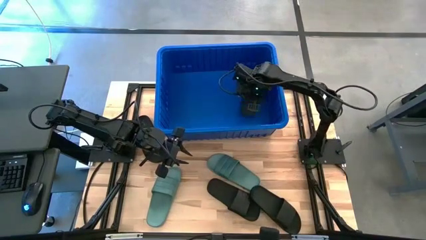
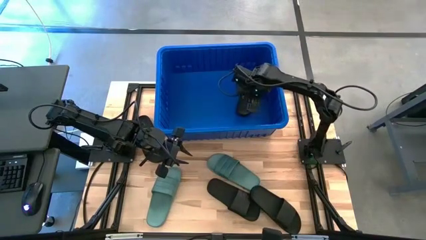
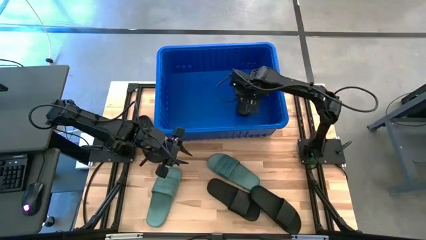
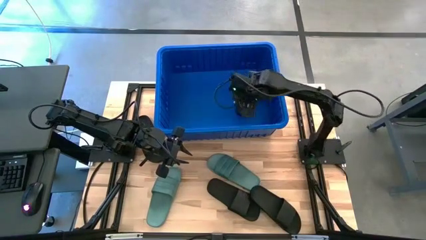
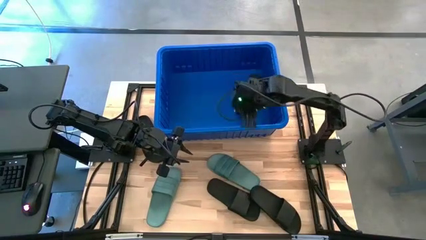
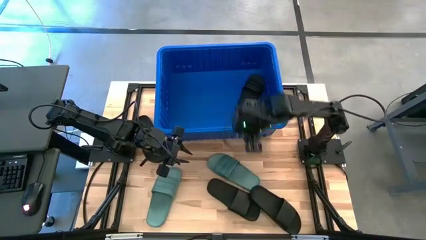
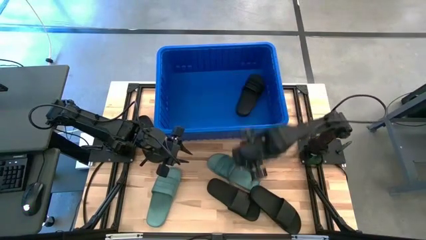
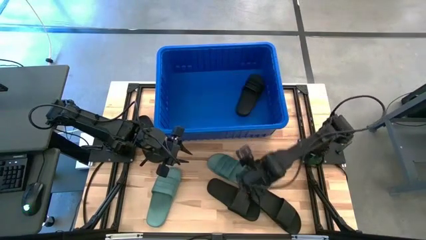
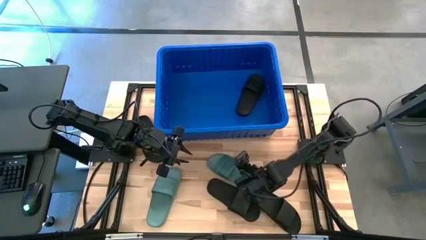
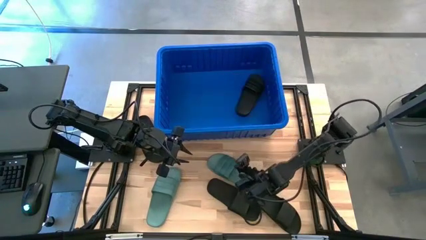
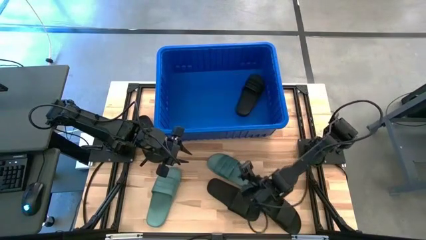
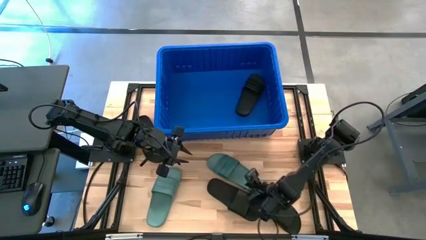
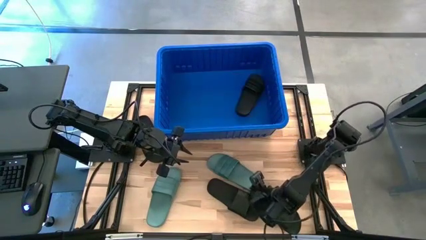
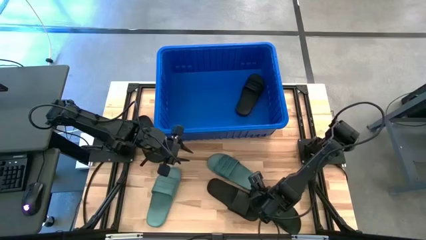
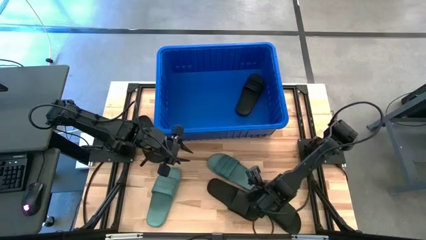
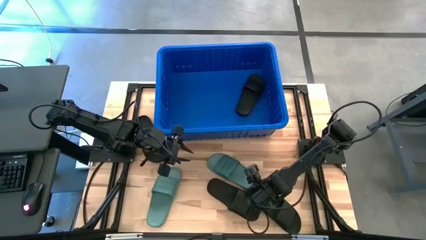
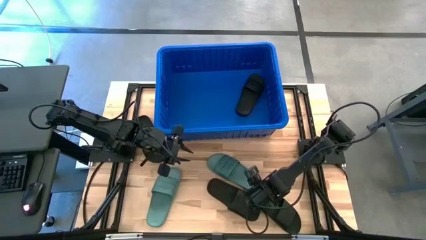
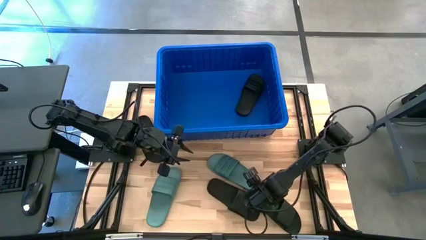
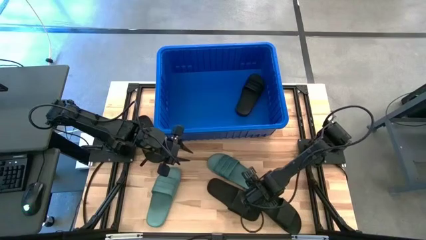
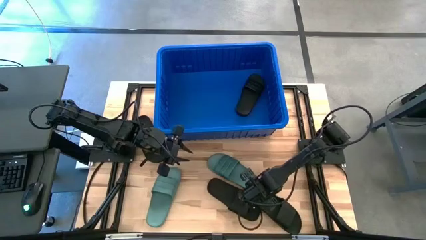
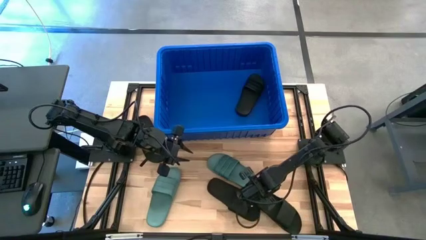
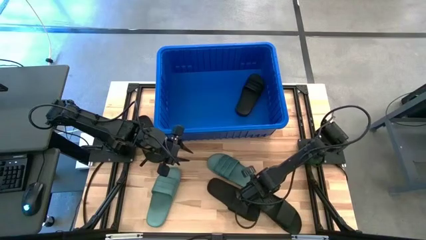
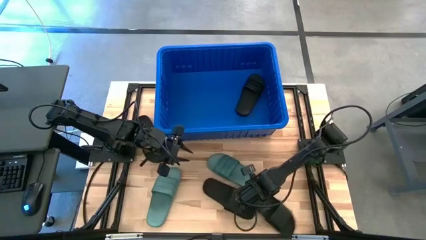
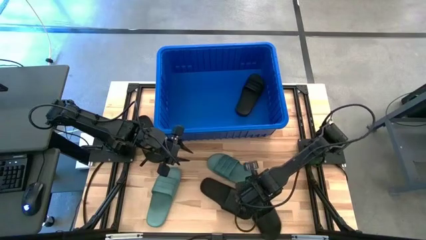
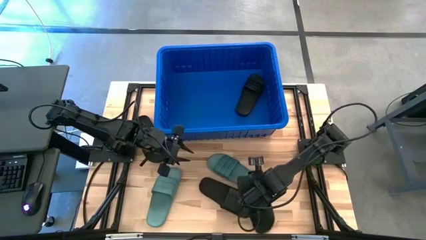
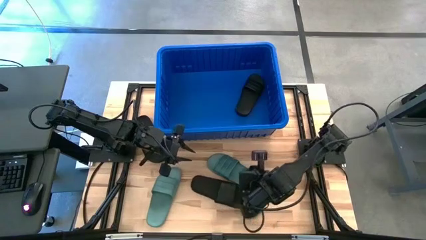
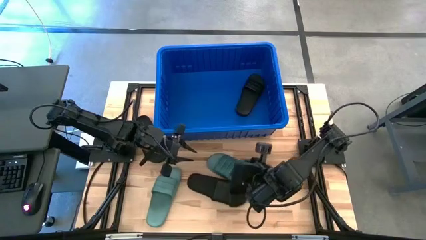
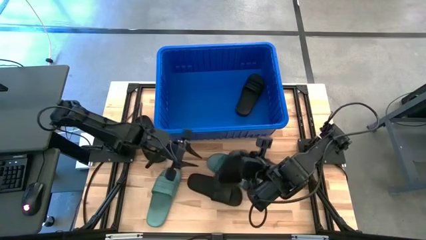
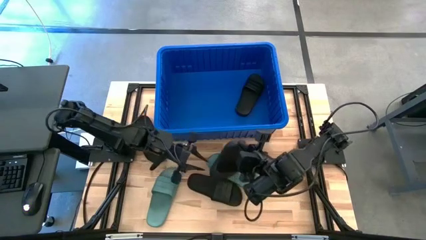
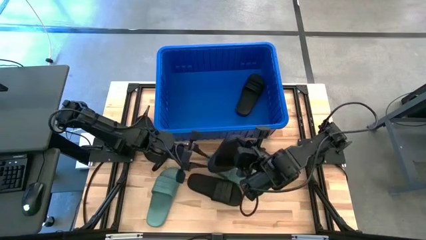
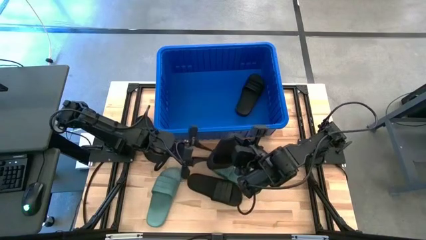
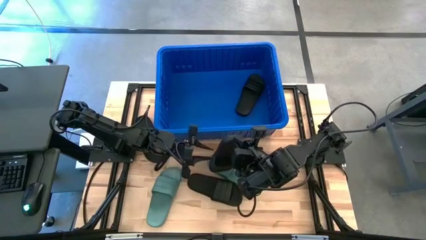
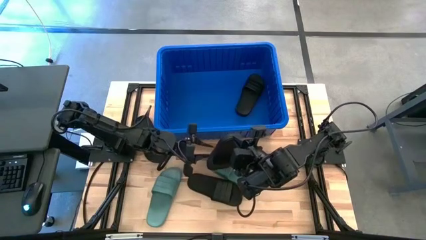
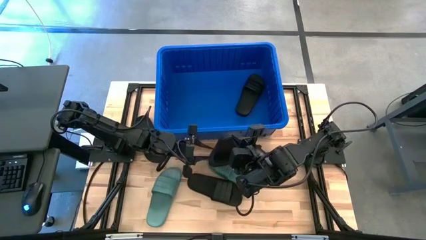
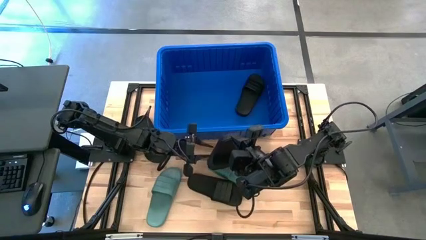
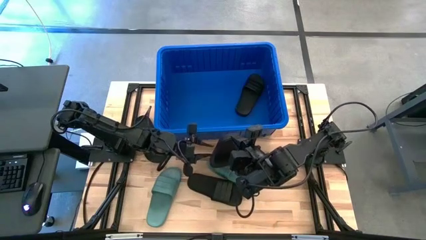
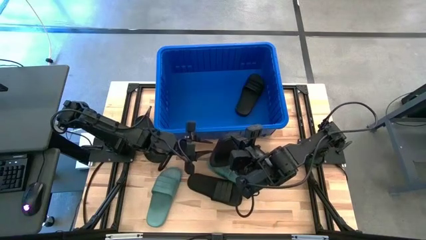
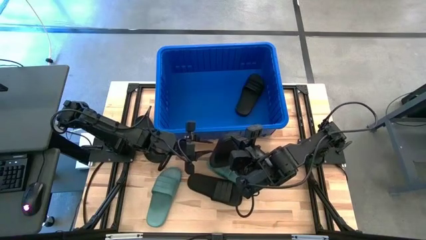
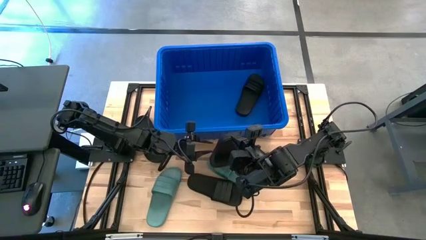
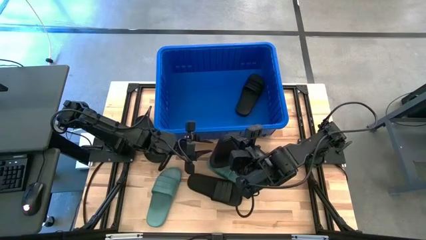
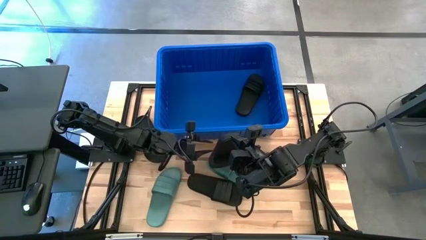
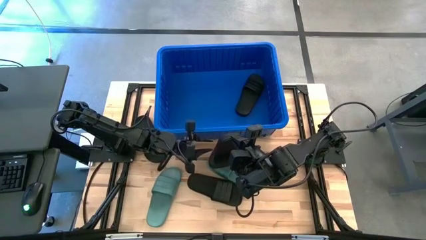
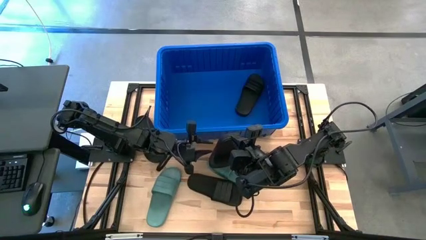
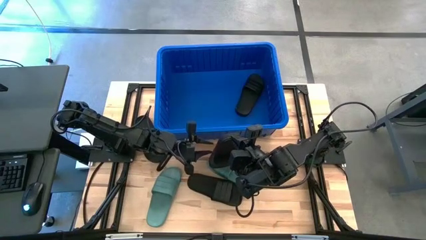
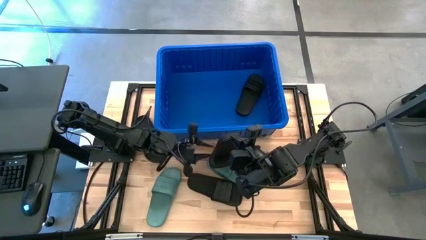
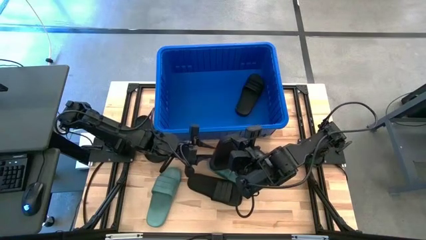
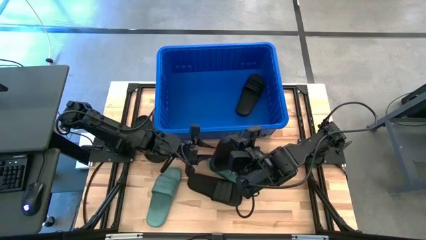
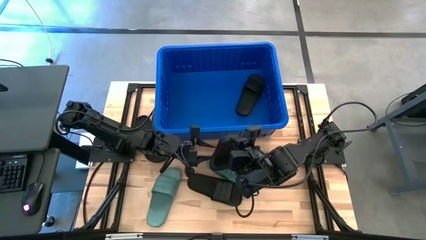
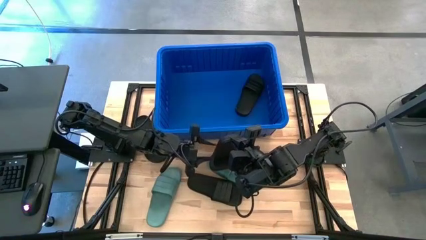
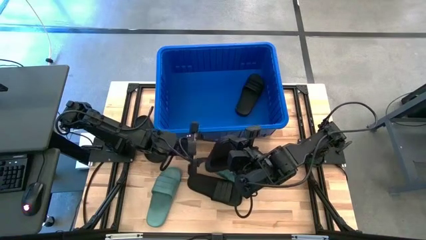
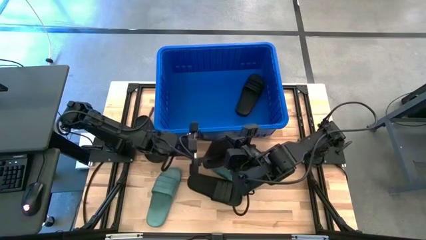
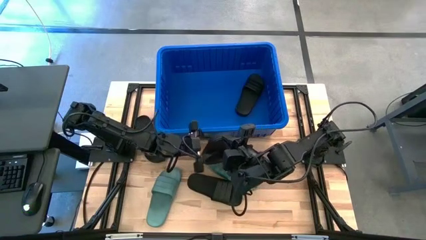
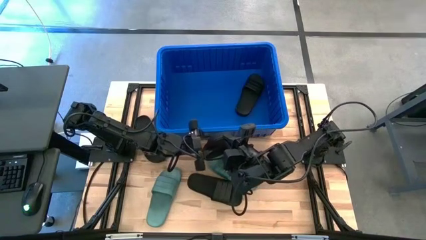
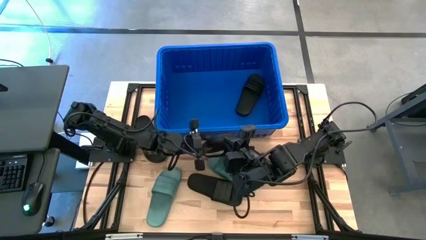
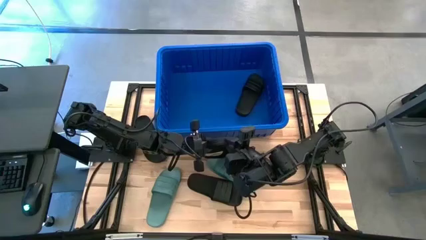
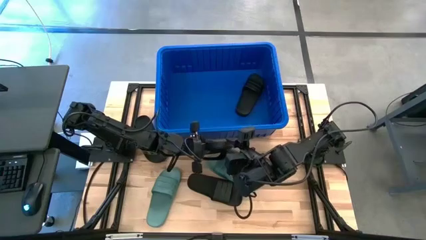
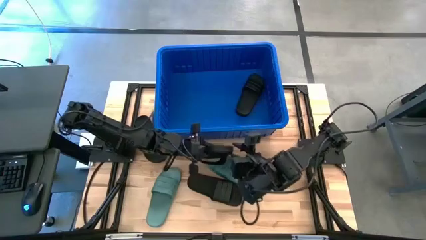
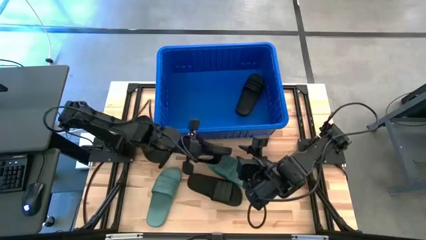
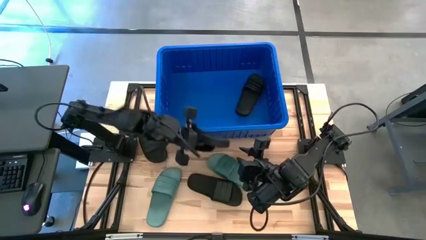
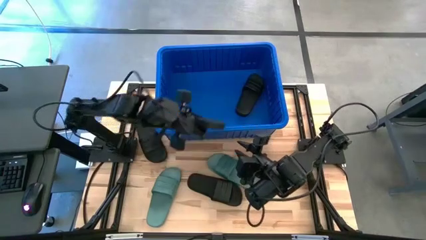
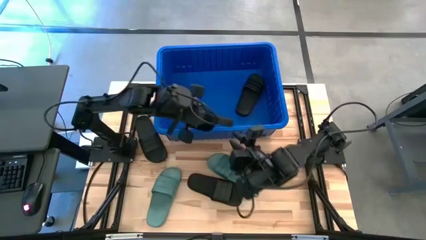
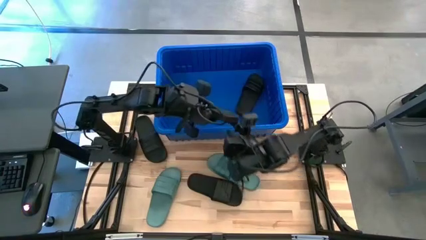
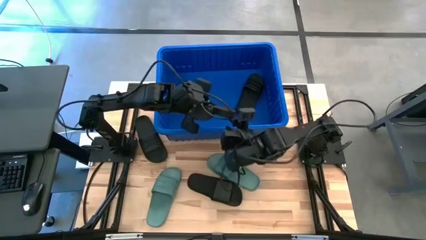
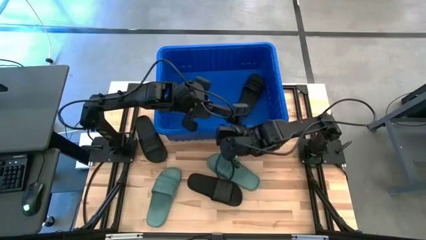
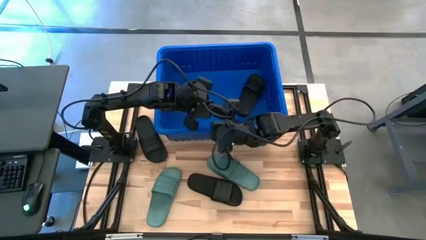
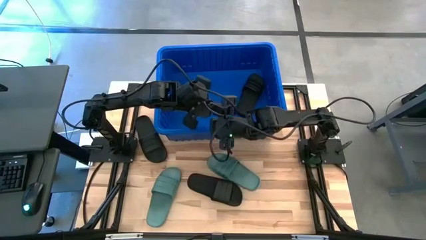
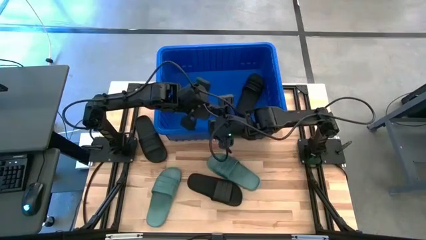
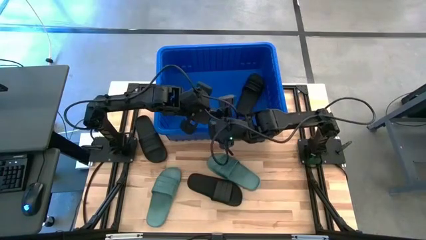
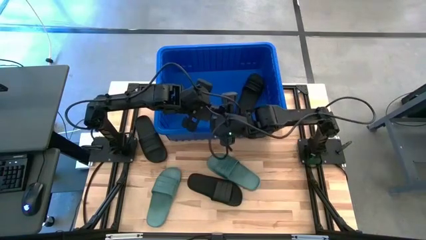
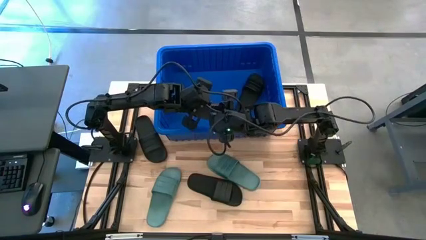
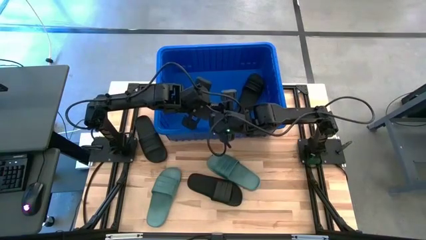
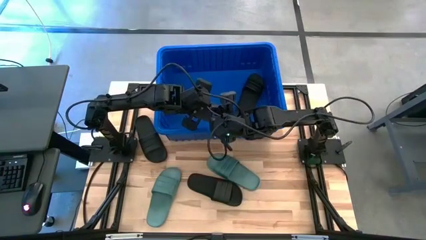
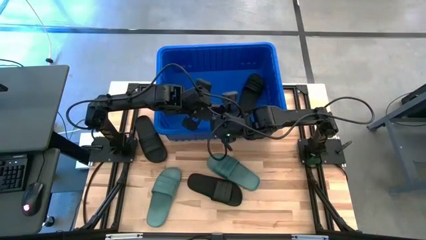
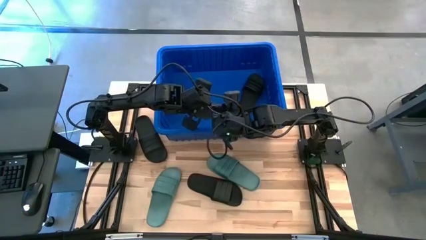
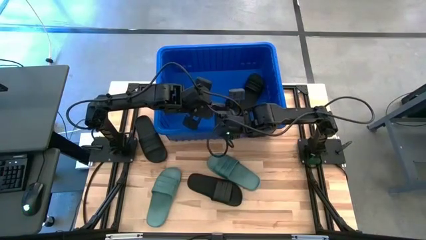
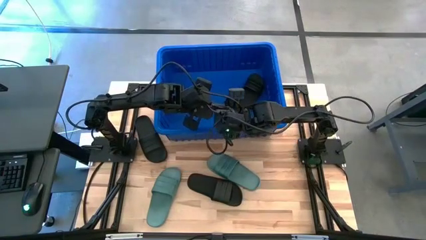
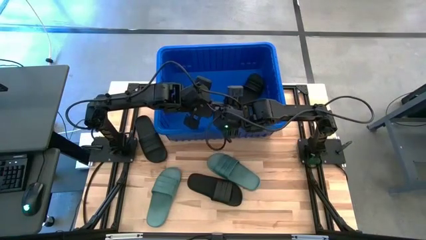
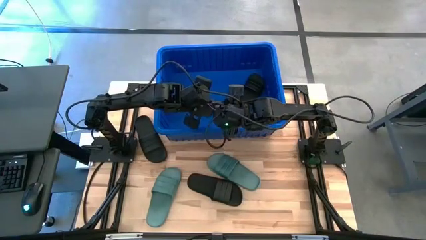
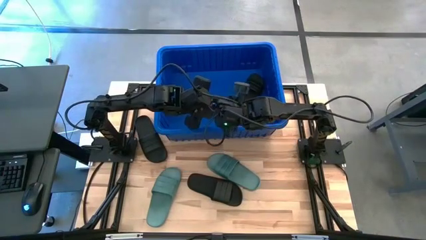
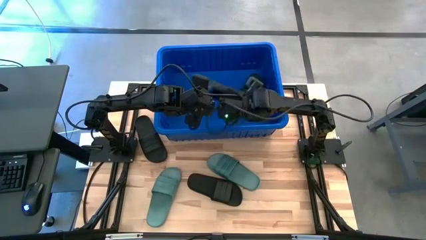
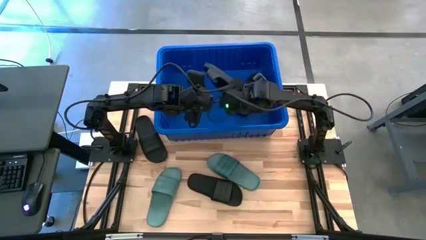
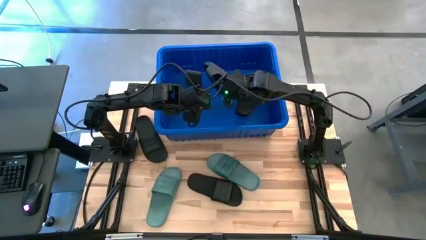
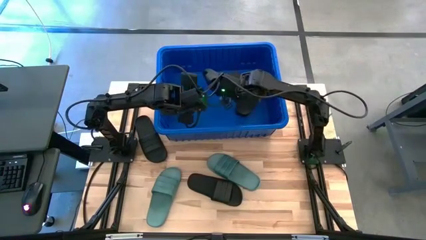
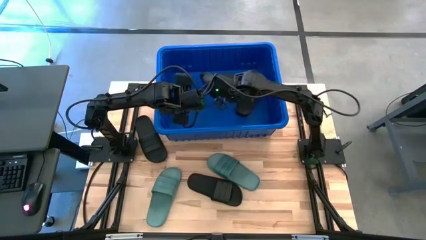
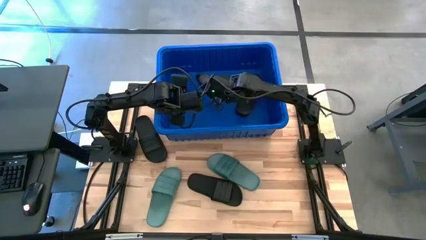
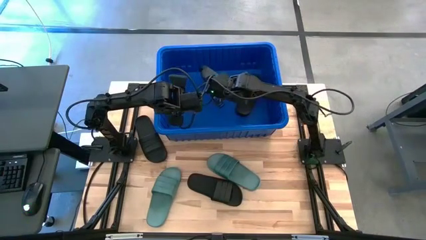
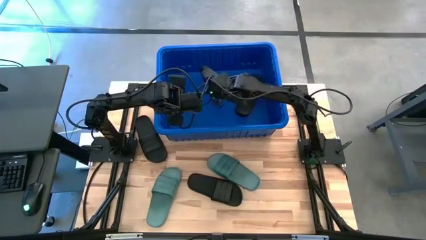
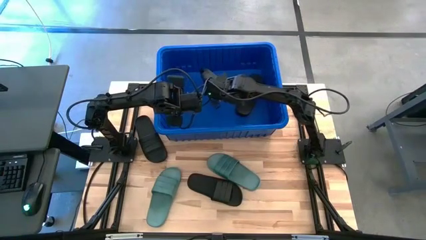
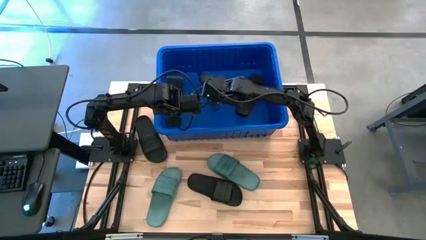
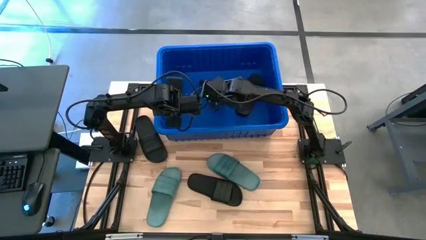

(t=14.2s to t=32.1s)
Task: Pick and place slides into bin
Put the black slipper into the blue bin
